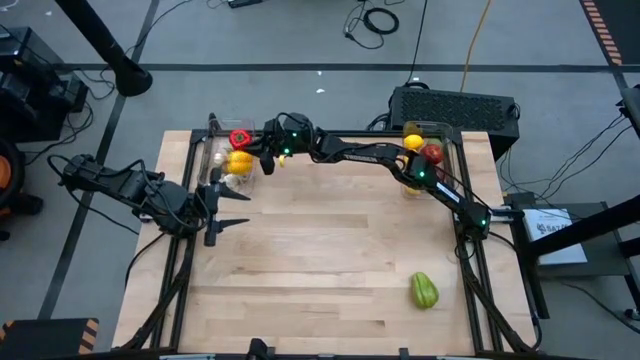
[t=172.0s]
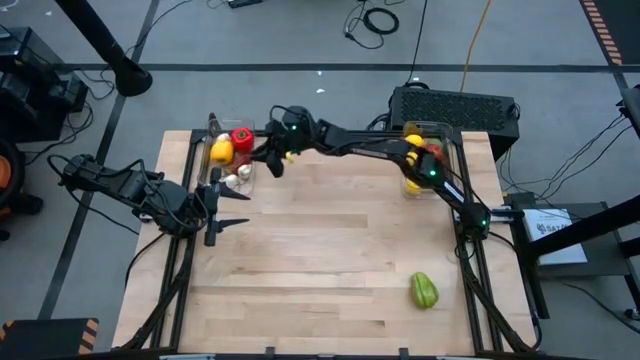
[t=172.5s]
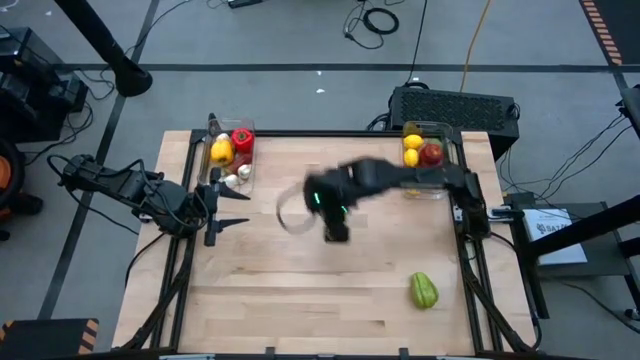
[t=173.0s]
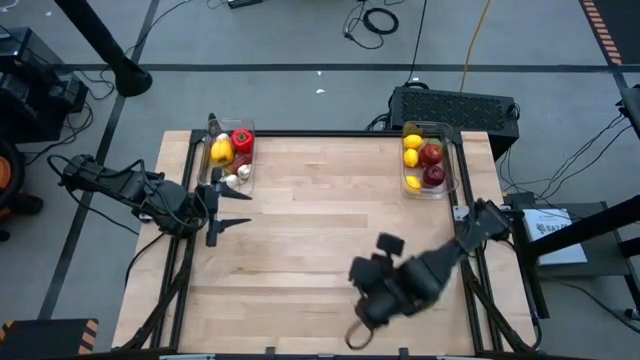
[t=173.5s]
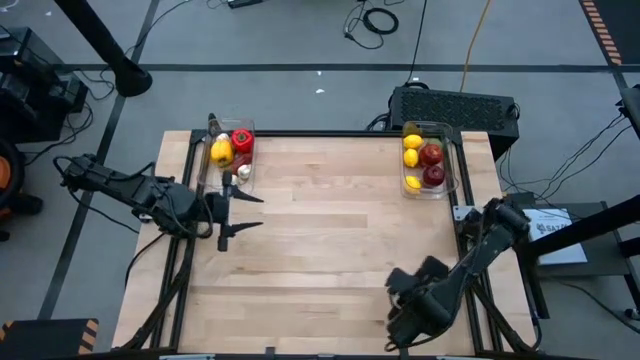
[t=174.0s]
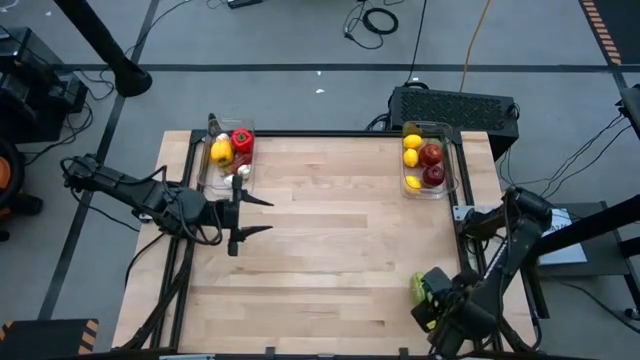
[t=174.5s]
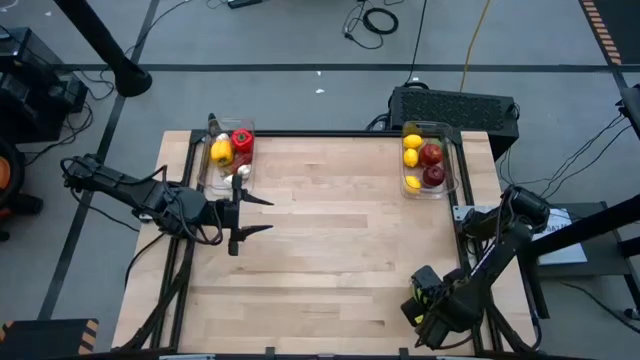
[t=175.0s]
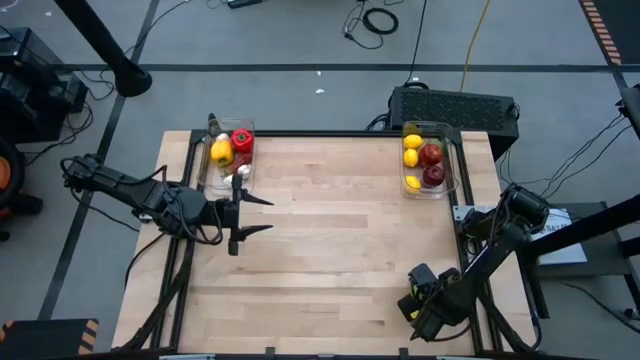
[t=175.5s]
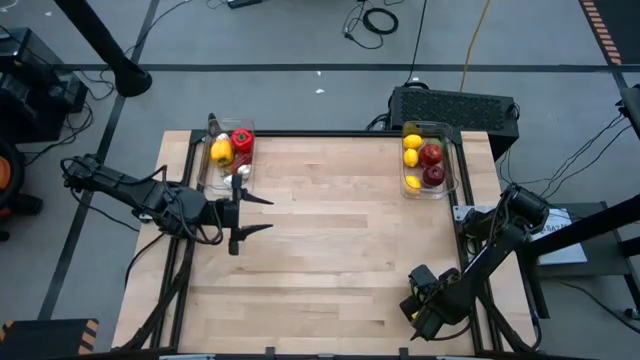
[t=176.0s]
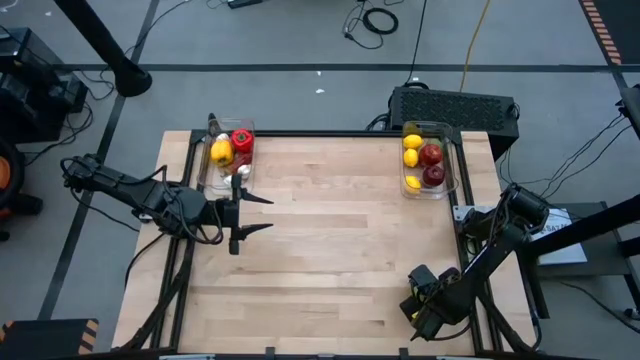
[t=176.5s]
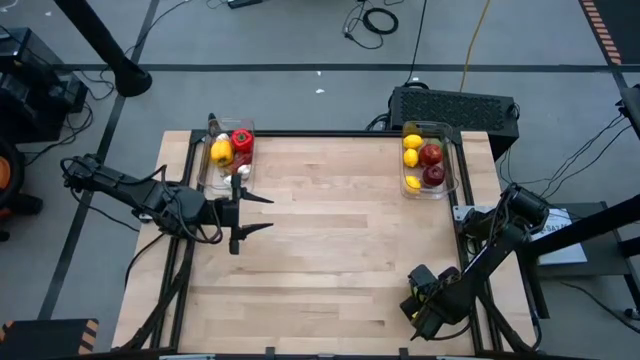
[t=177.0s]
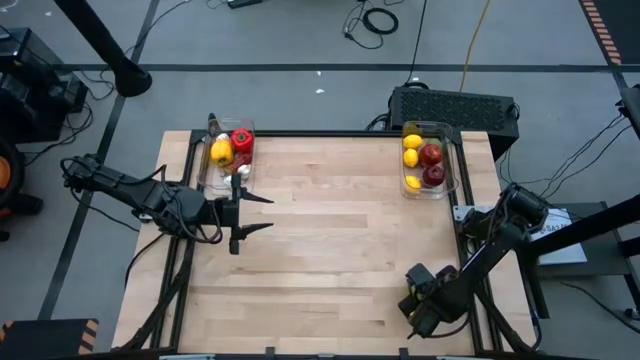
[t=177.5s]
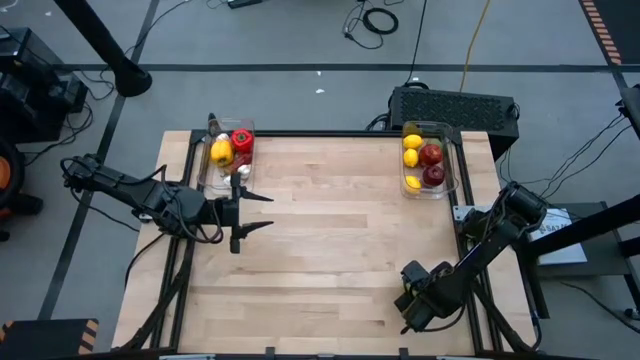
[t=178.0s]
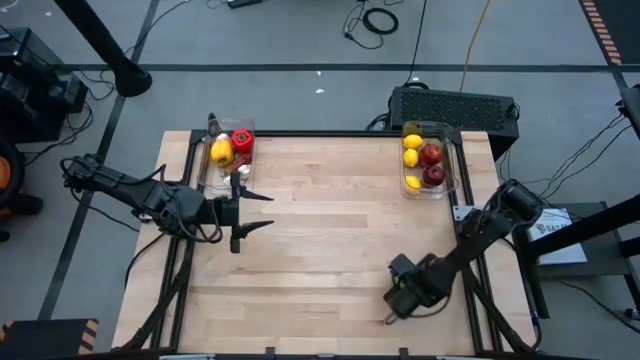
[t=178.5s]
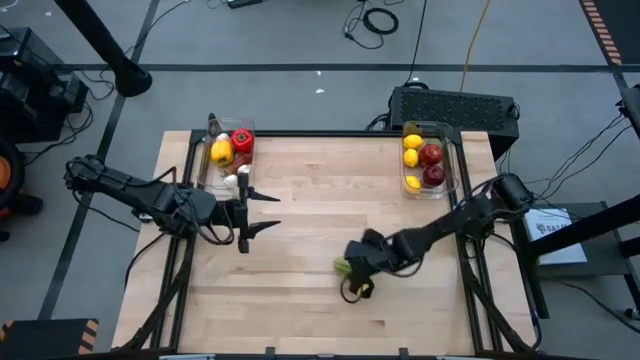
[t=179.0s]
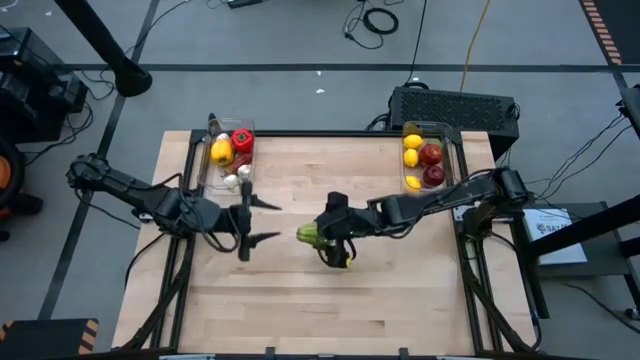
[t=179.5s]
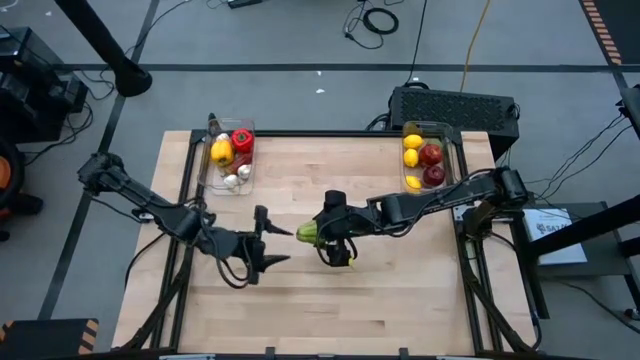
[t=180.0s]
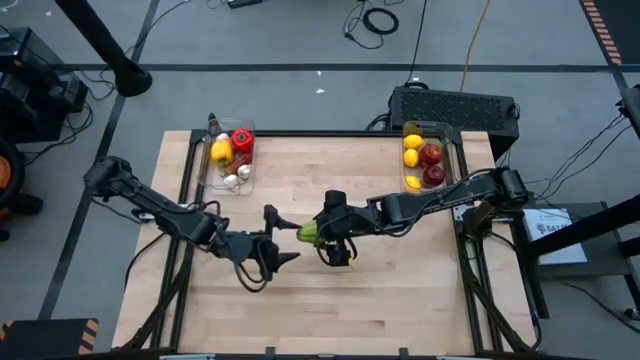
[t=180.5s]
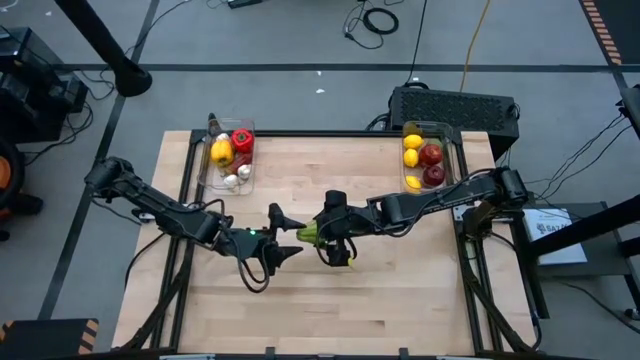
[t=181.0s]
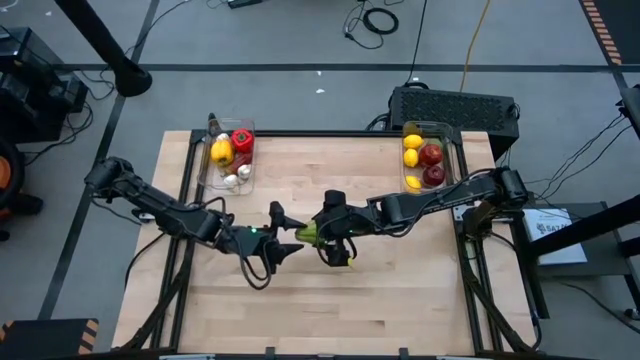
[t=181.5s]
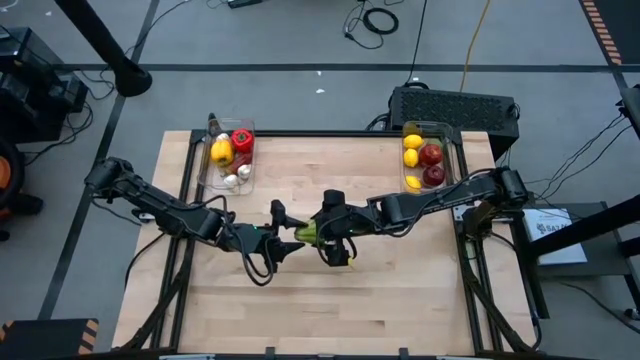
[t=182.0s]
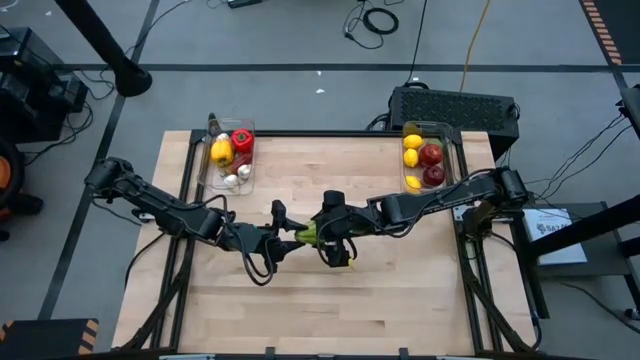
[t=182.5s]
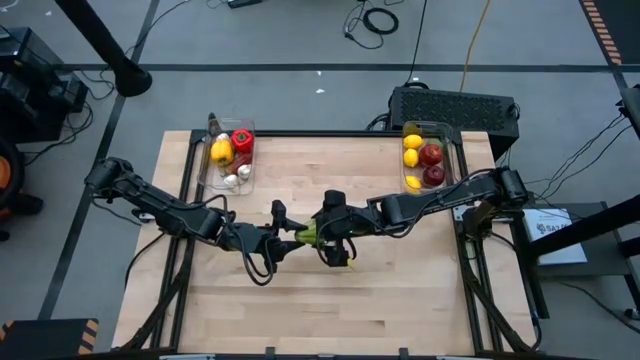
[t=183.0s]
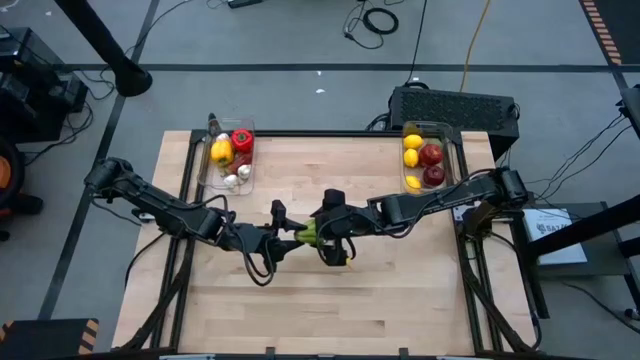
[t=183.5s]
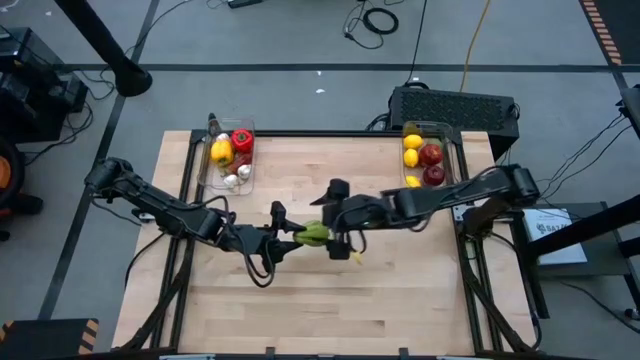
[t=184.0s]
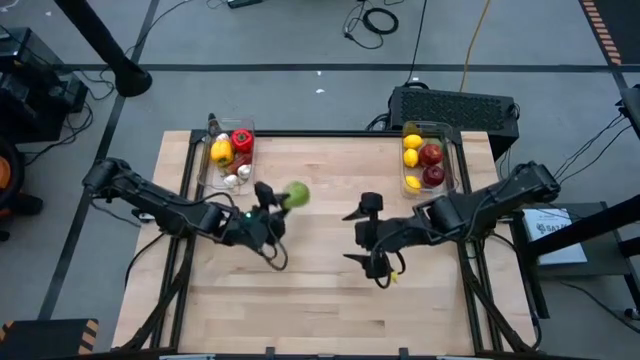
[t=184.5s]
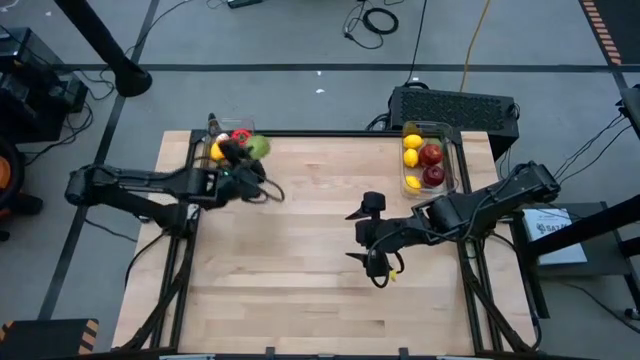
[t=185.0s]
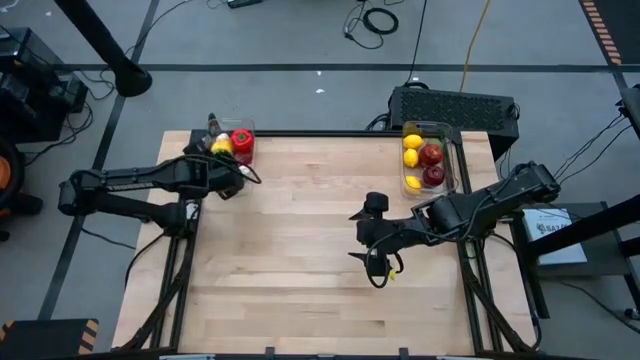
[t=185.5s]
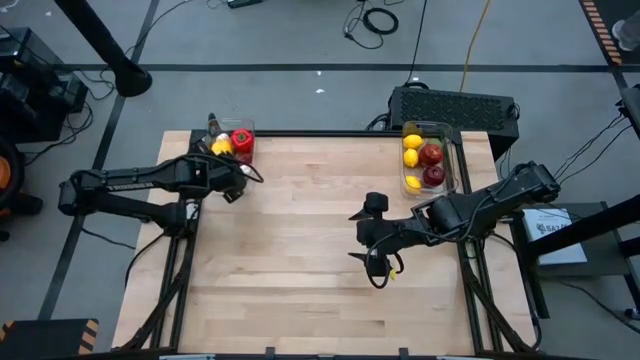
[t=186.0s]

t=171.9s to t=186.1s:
Task: Sort produce into baskets
Put the chayote into the left transparent bin

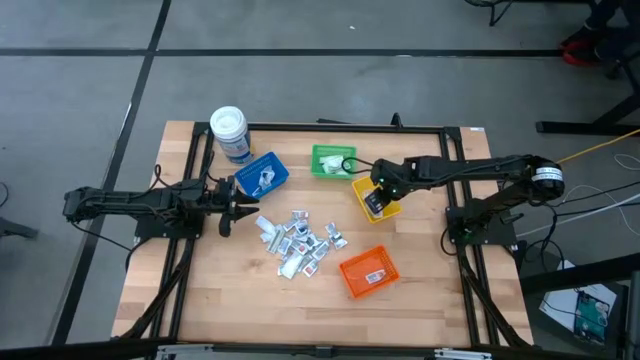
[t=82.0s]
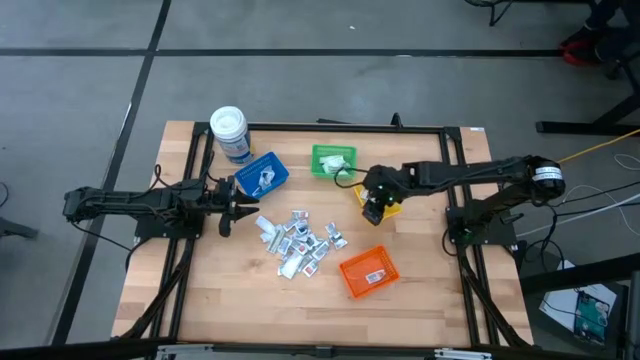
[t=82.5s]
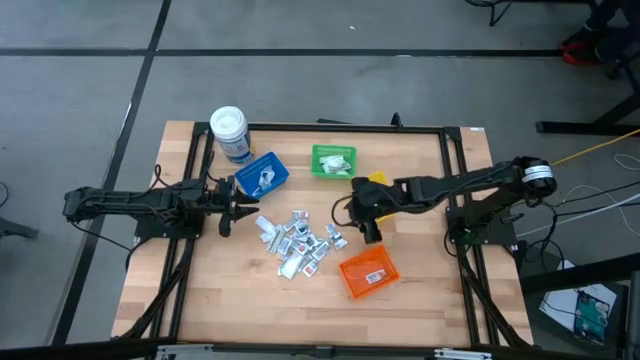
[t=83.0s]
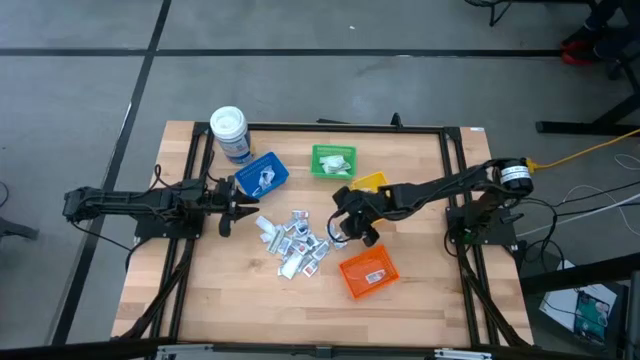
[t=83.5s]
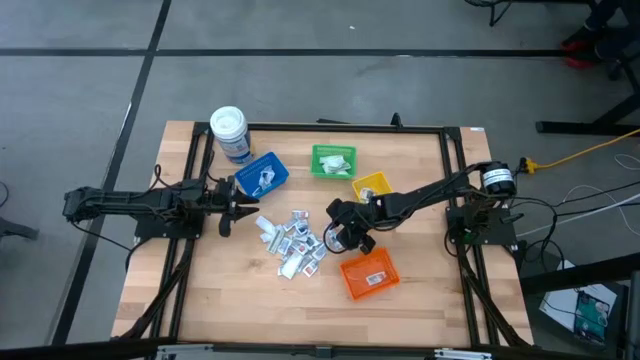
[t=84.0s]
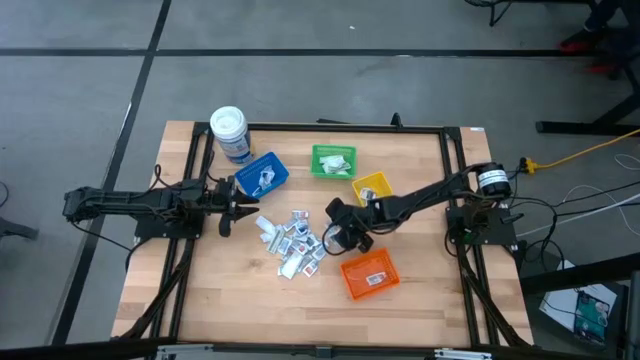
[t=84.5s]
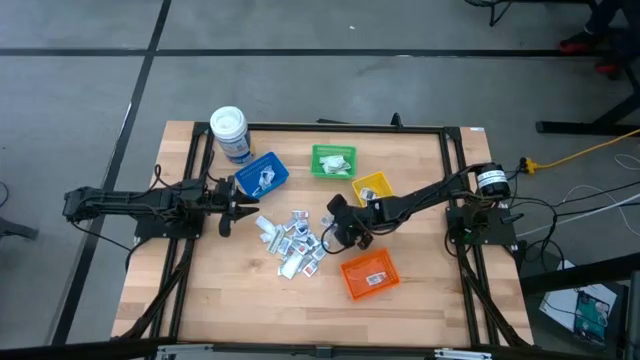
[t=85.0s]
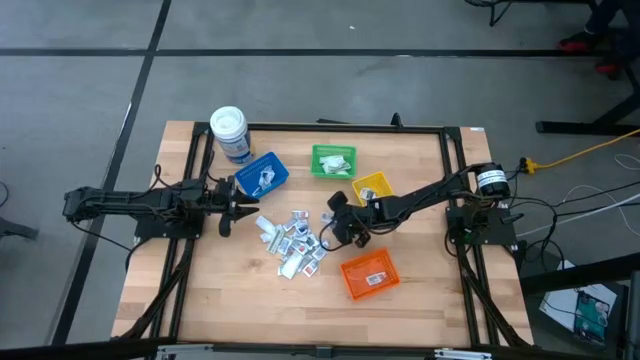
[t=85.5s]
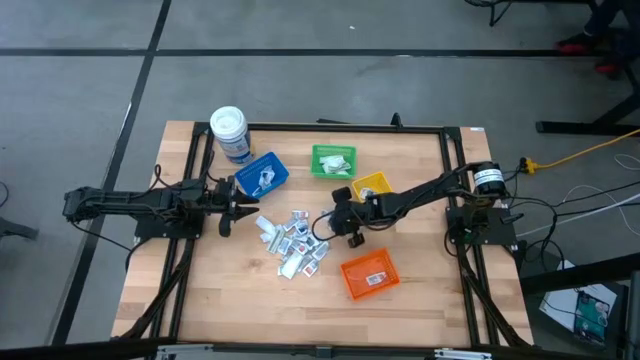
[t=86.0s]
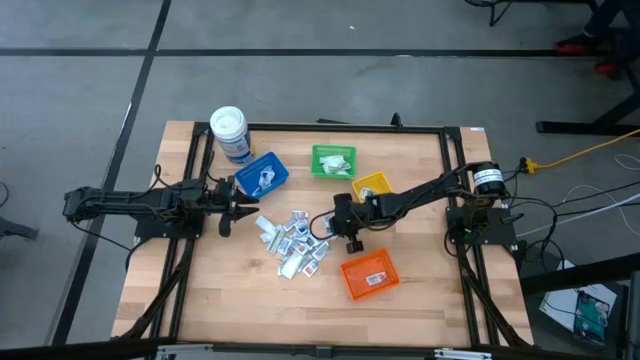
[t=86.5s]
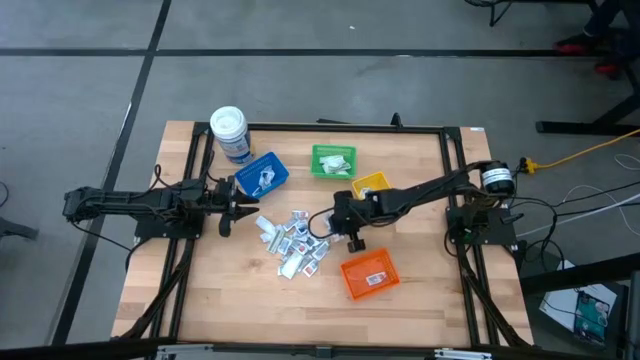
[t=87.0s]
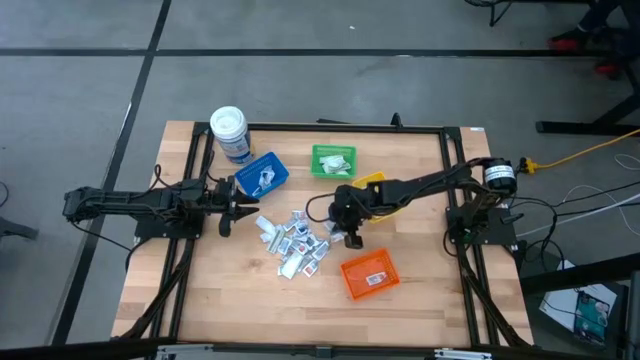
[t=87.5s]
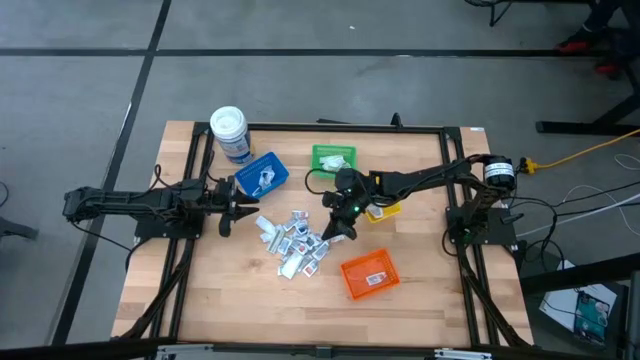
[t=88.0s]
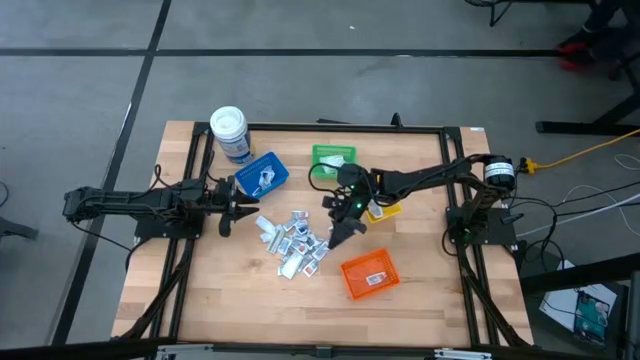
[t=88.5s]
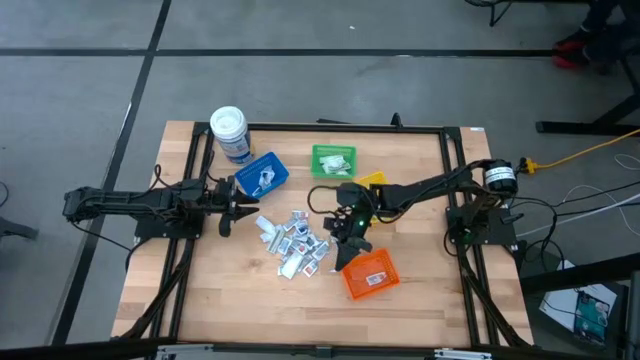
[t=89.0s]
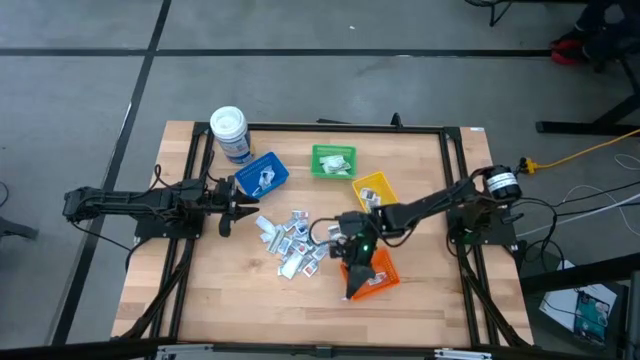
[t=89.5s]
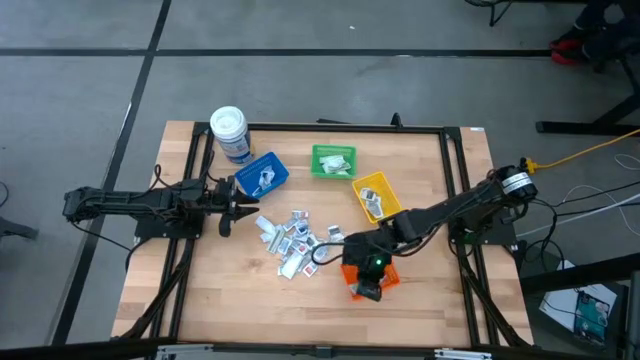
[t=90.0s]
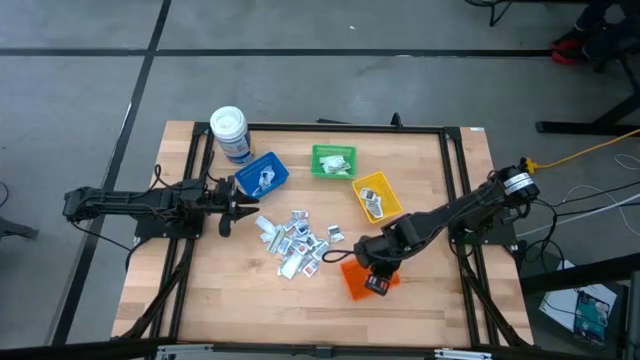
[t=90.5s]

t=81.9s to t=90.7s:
Task: Pick & Place First Aid Supplies
Put the white ointment pack into the orange bin
